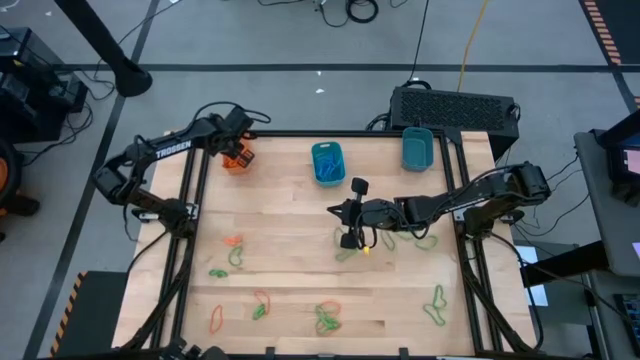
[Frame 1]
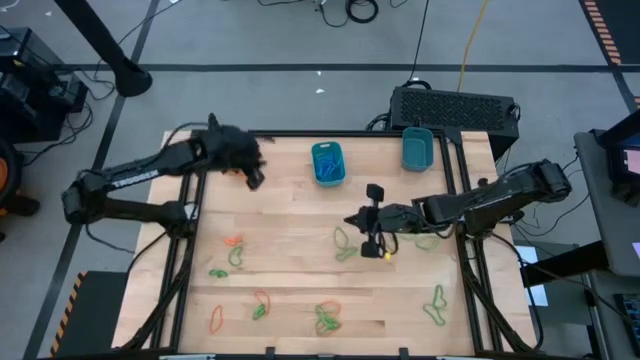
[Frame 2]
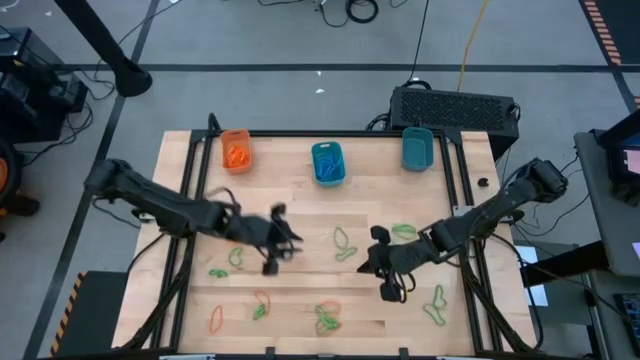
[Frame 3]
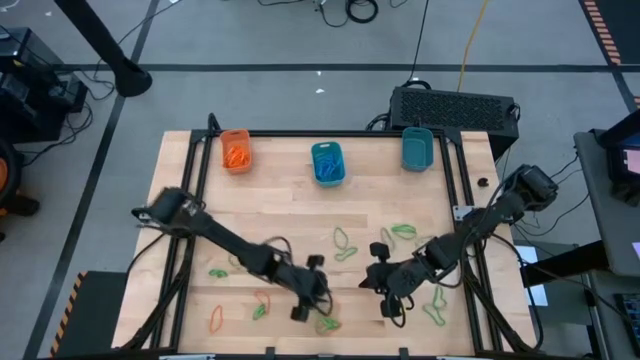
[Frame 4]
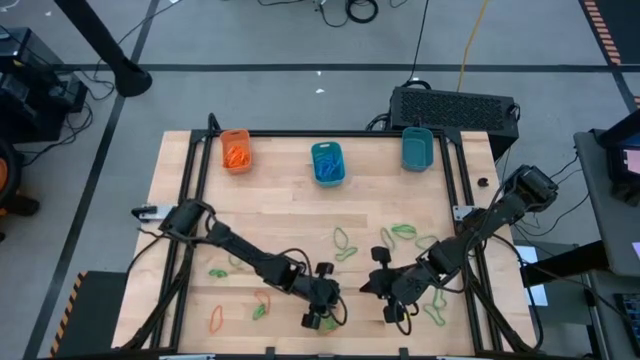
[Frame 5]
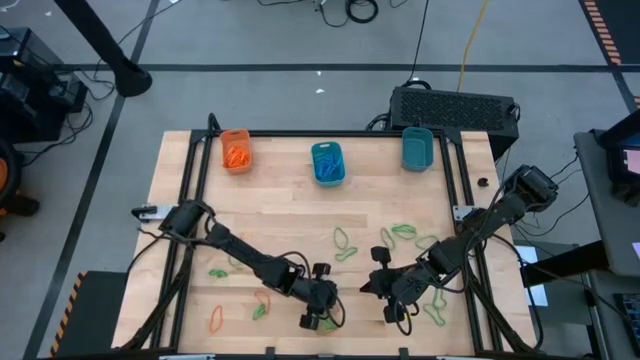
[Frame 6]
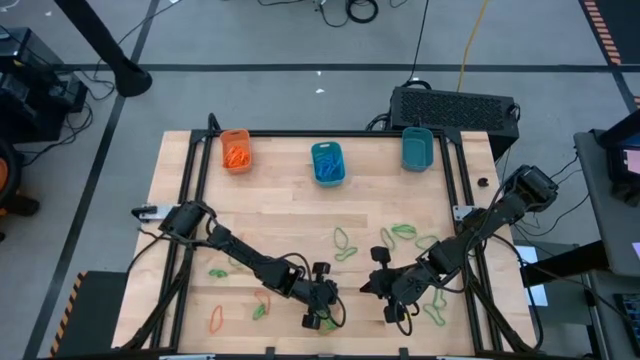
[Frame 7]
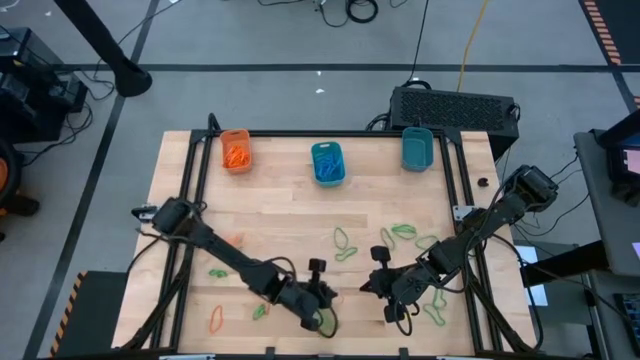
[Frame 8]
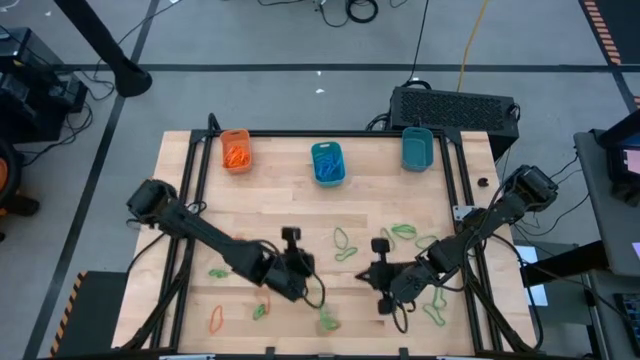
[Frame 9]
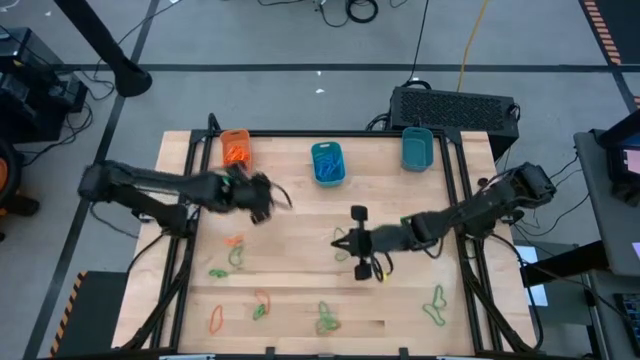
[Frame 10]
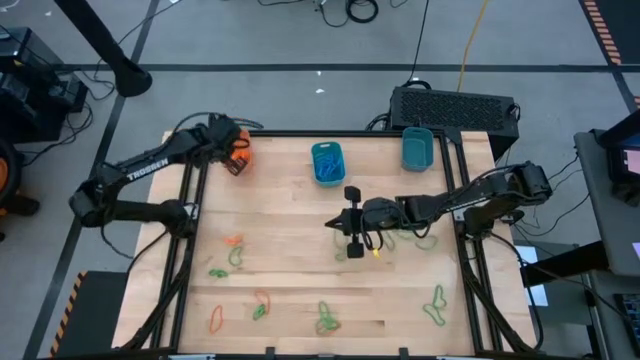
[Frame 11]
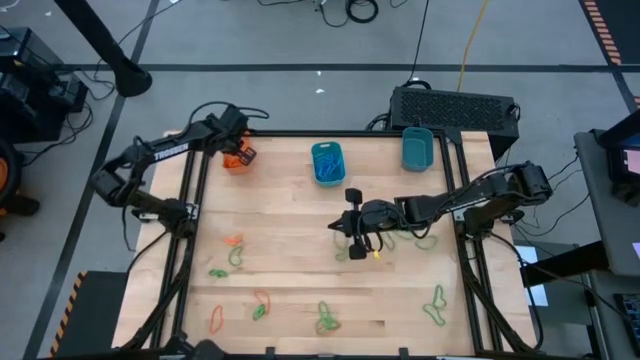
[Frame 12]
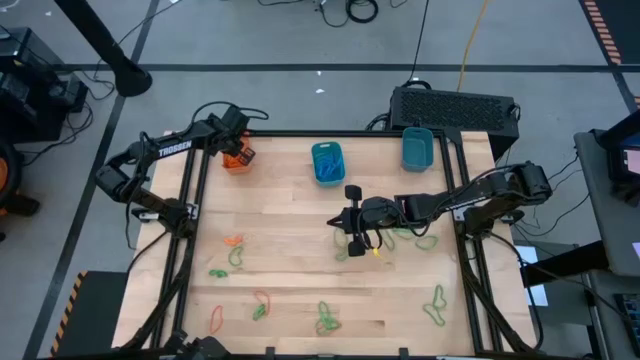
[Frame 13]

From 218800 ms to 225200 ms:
Task: Sort rubber bands into baskets
Put the orange rubber band into the orange bin

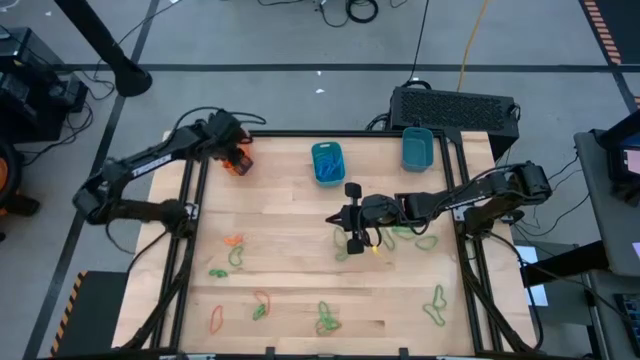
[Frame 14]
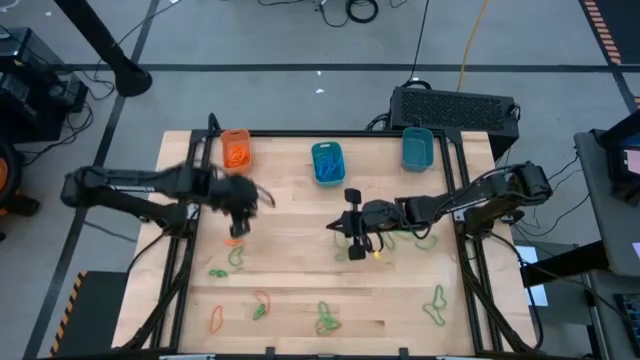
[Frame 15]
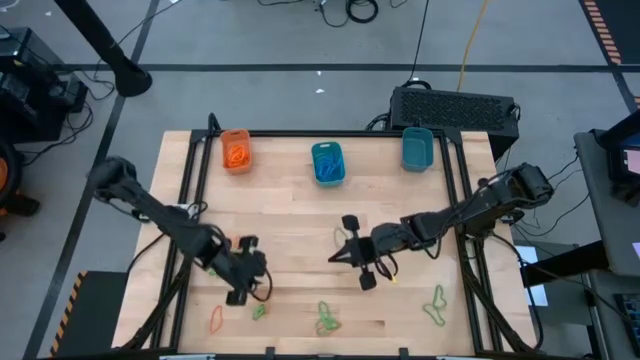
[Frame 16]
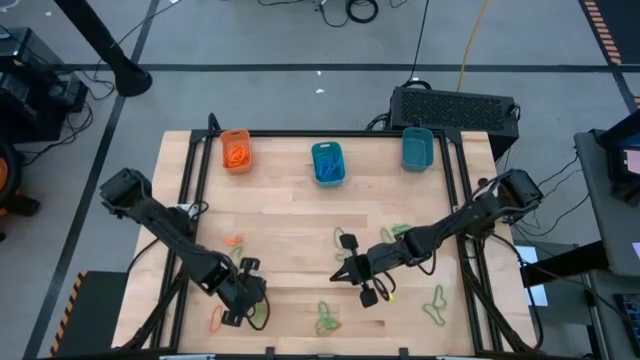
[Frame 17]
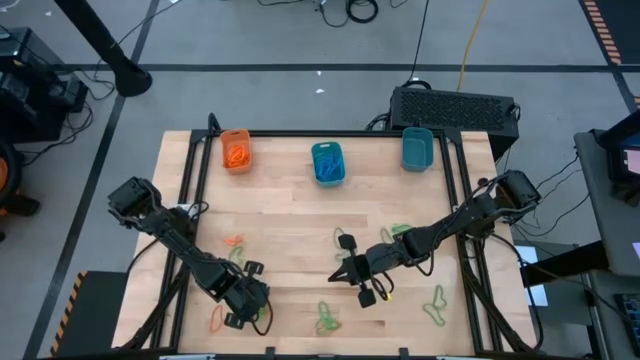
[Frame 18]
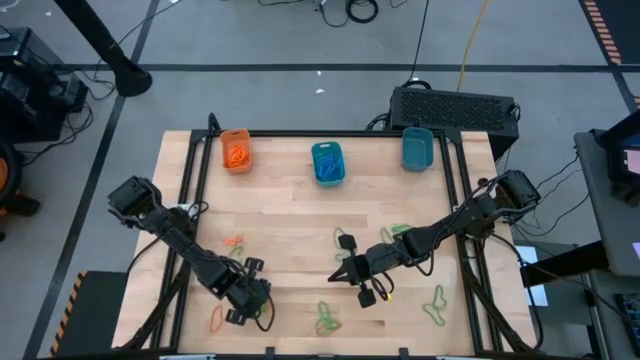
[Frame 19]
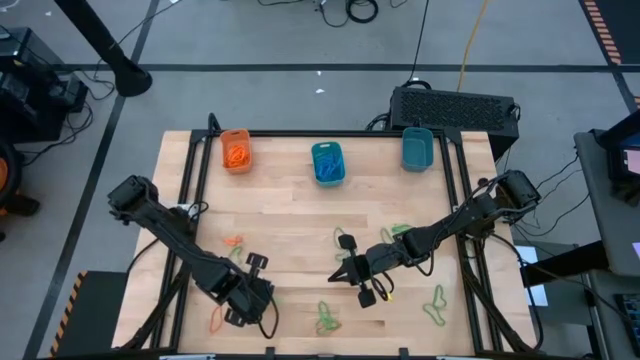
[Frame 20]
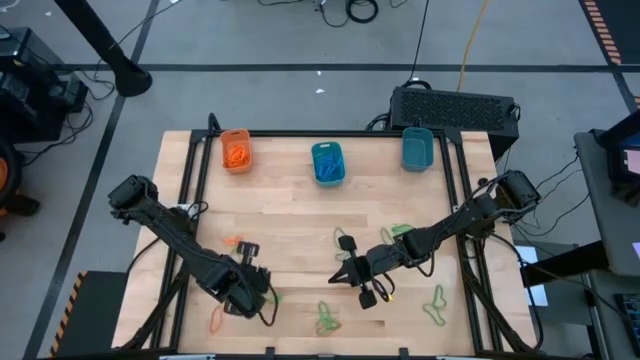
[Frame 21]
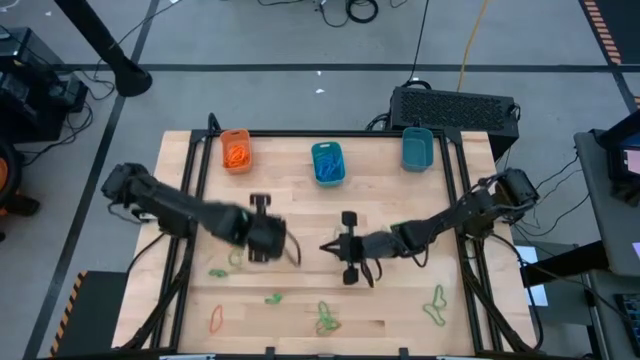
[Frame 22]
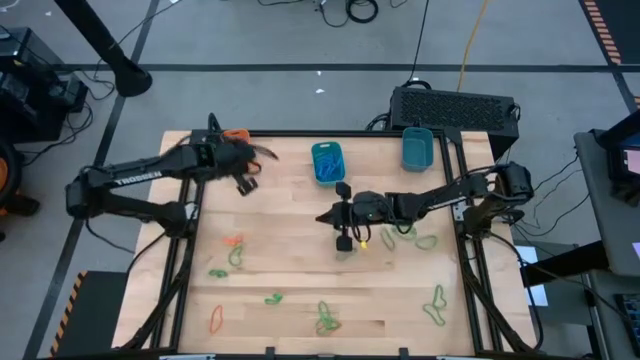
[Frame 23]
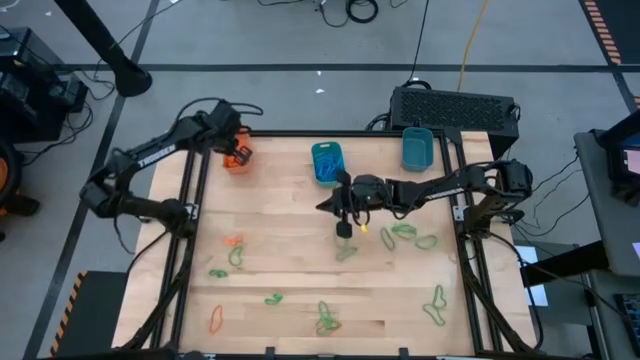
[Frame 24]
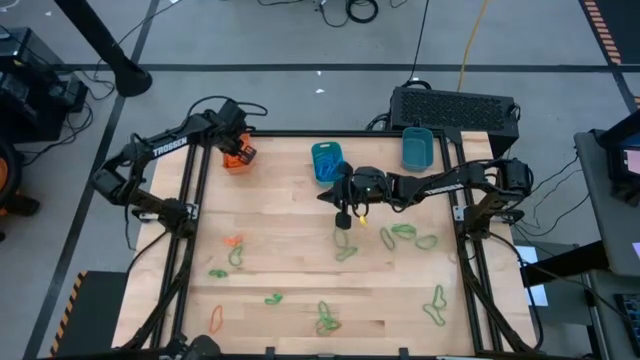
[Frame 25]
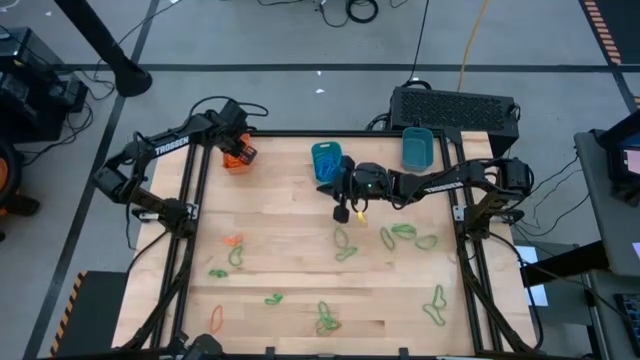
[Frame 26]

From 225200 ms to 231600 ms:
Put the orange rubber band into the orange bin

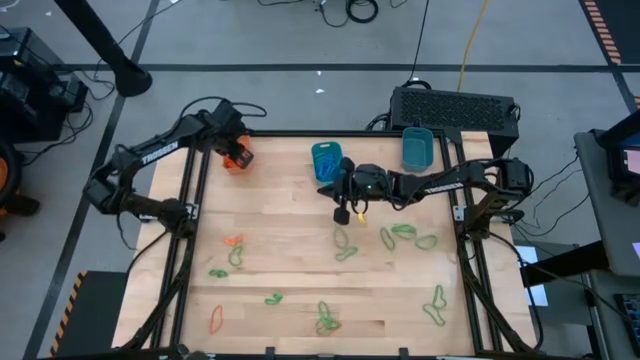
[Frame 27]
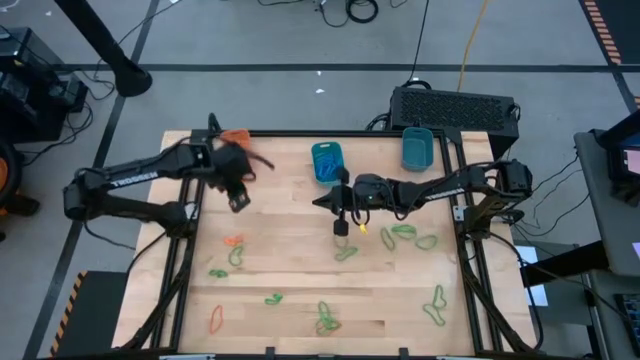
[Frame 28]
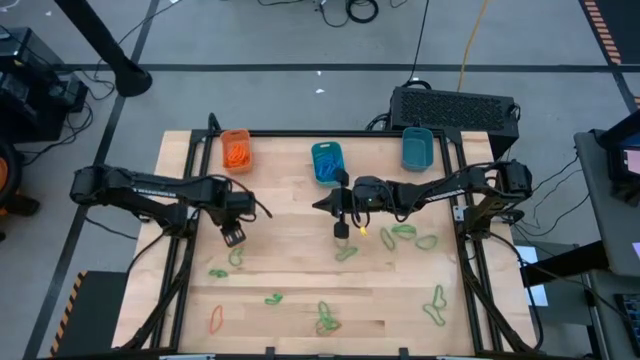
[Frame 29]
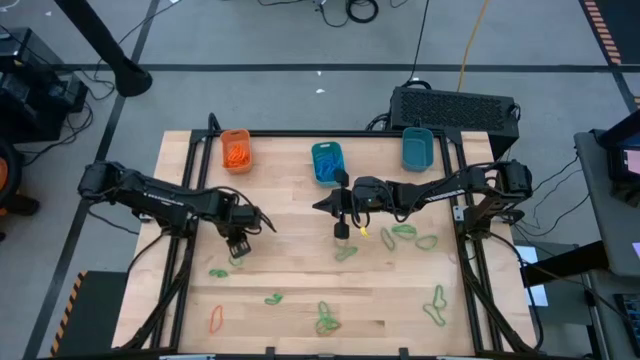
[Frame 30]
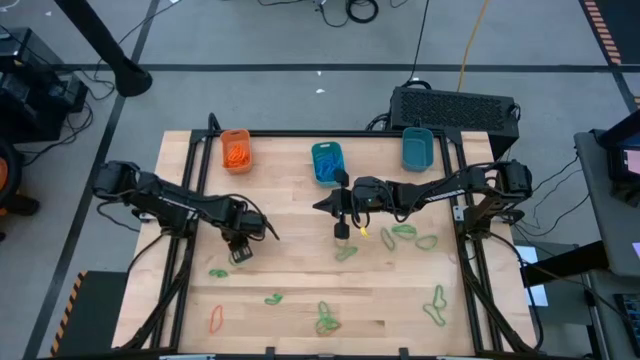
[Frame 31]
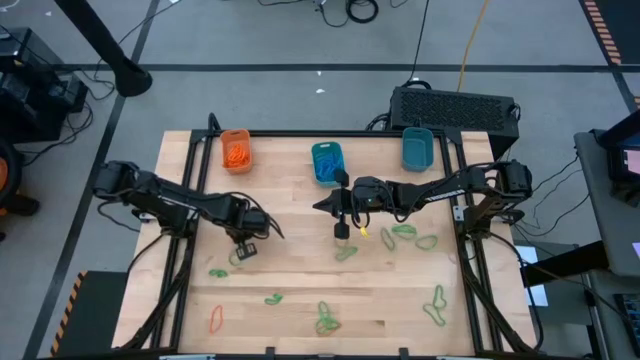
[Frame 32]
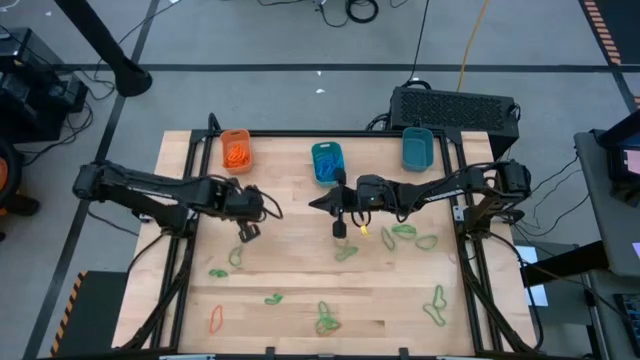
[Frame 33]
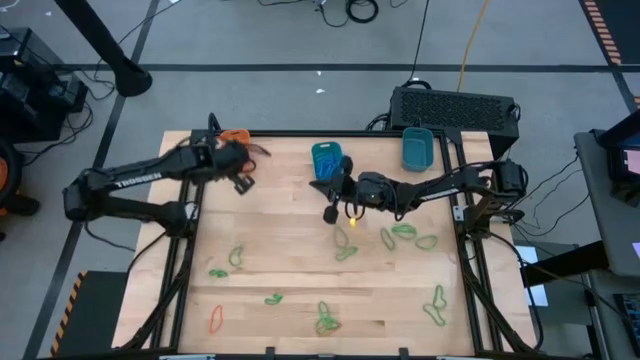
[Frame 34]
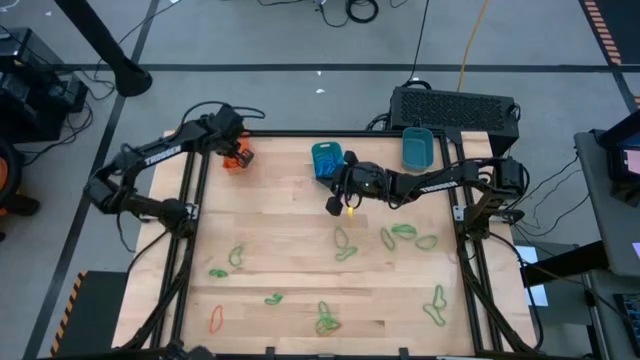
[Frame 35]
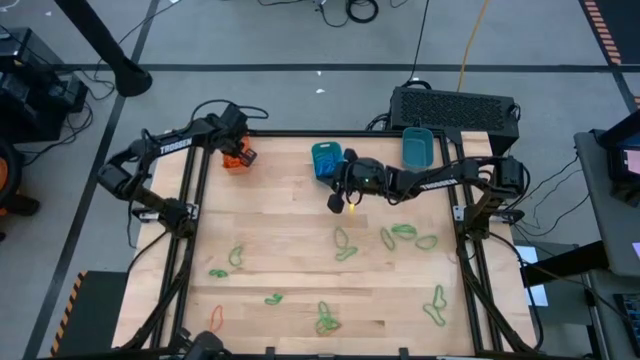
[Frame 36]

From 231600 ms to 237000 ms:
Put the orange rubber band into the orange bin
